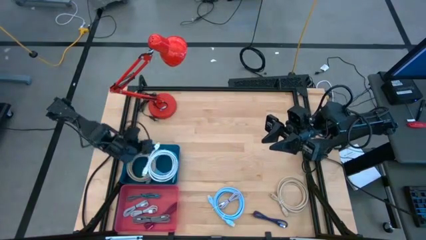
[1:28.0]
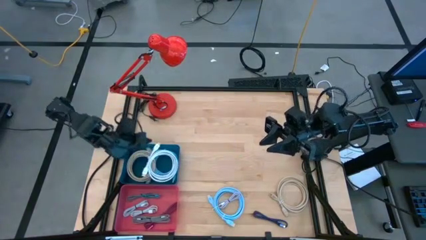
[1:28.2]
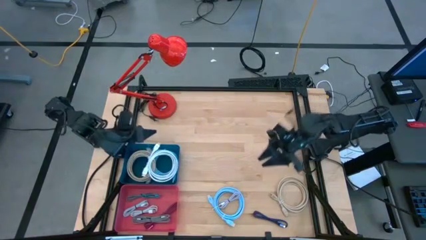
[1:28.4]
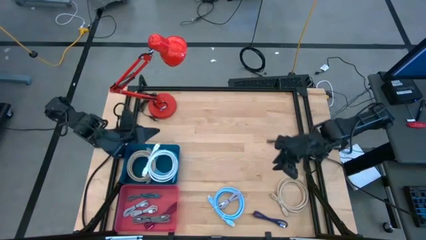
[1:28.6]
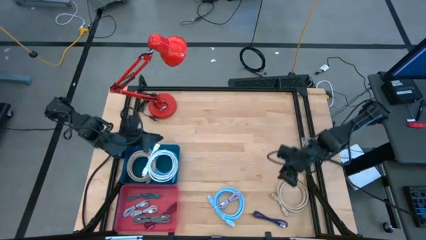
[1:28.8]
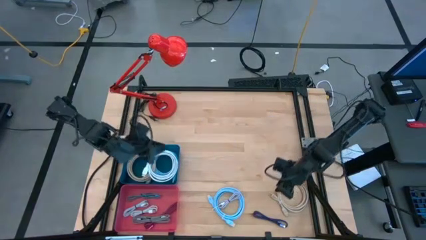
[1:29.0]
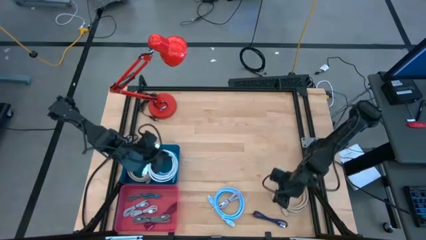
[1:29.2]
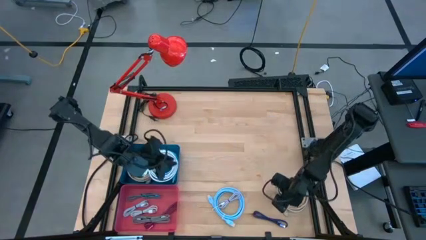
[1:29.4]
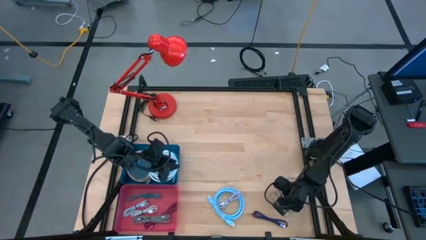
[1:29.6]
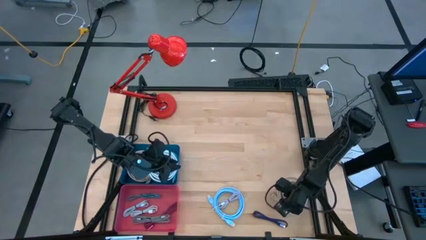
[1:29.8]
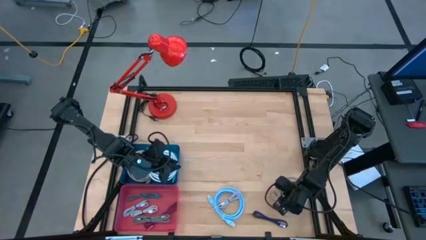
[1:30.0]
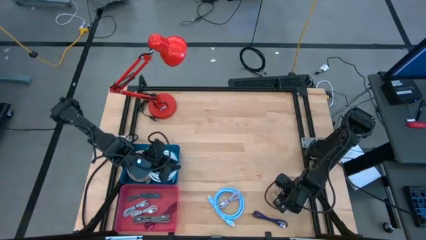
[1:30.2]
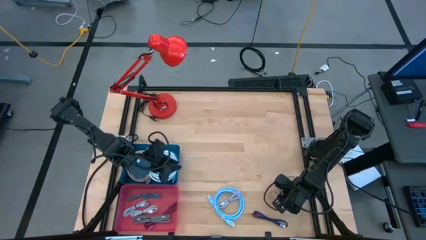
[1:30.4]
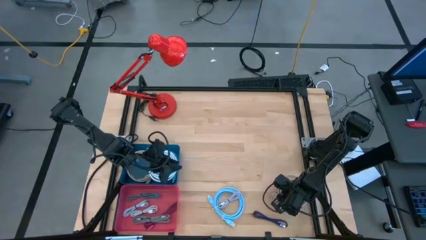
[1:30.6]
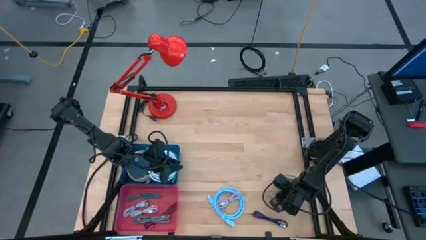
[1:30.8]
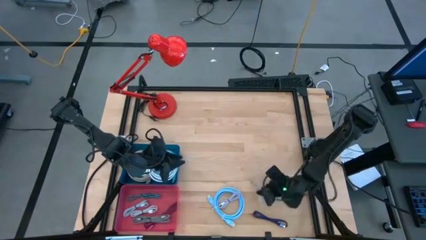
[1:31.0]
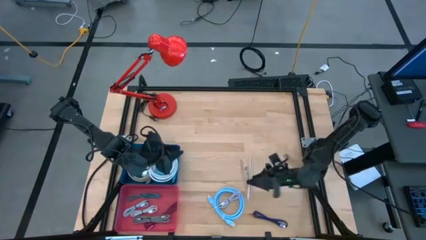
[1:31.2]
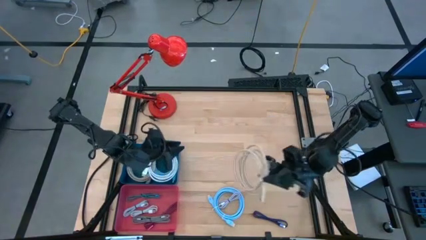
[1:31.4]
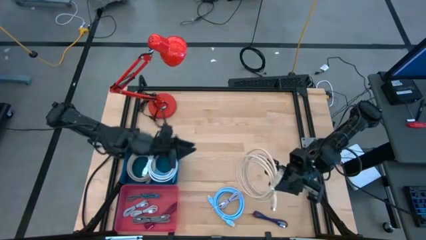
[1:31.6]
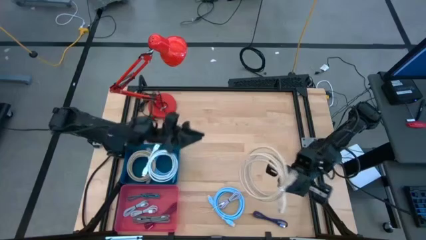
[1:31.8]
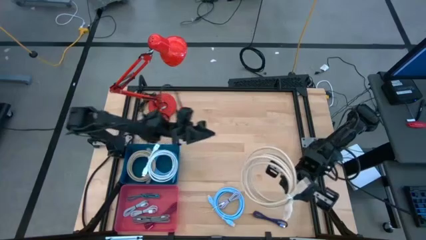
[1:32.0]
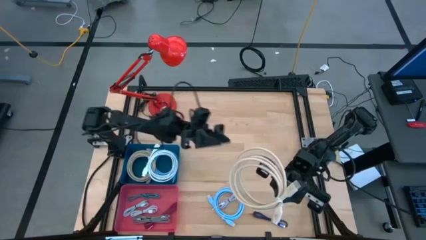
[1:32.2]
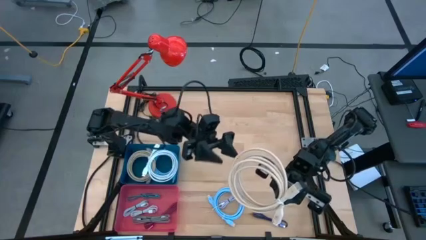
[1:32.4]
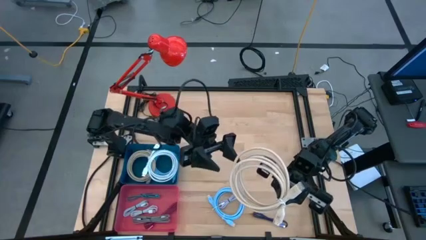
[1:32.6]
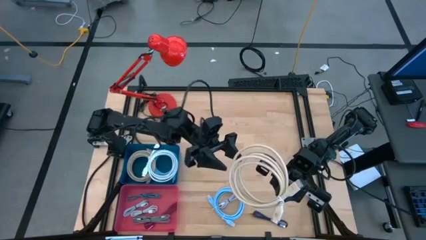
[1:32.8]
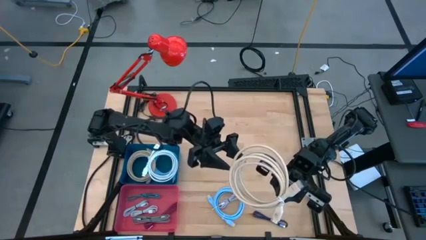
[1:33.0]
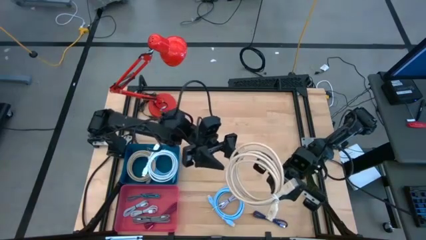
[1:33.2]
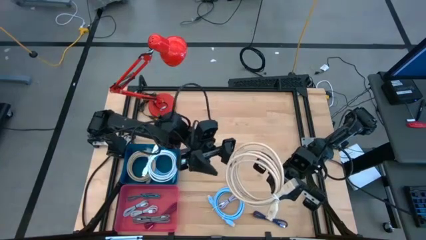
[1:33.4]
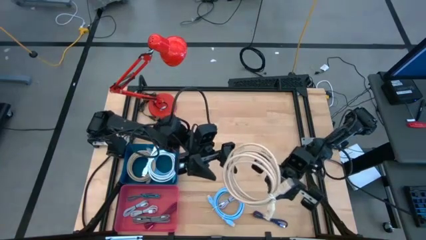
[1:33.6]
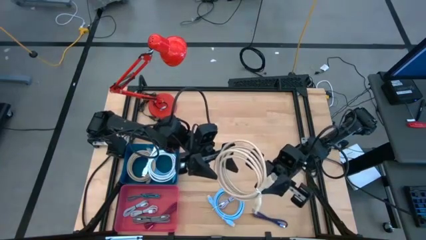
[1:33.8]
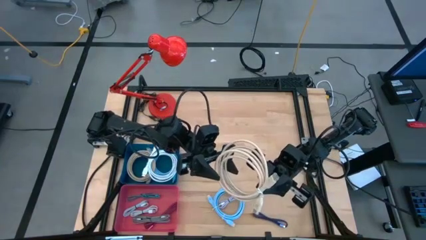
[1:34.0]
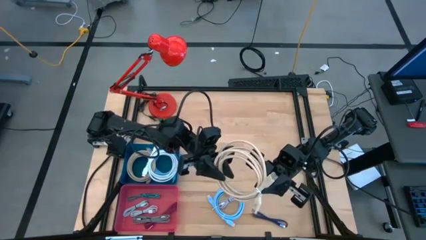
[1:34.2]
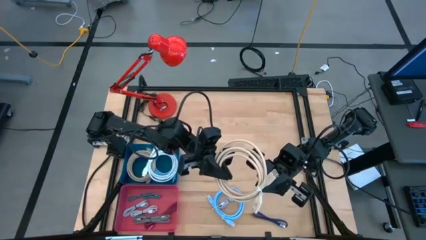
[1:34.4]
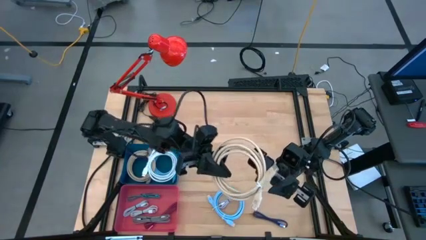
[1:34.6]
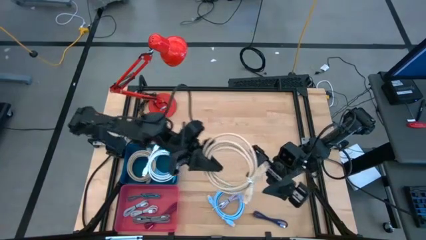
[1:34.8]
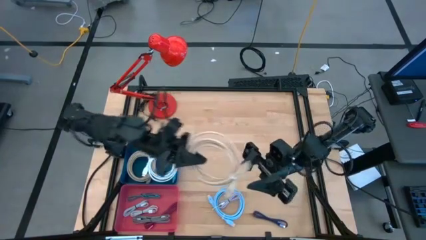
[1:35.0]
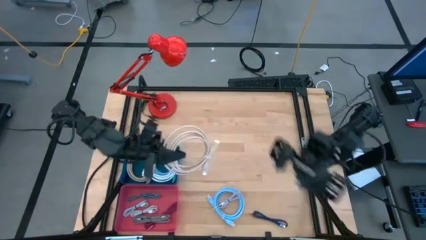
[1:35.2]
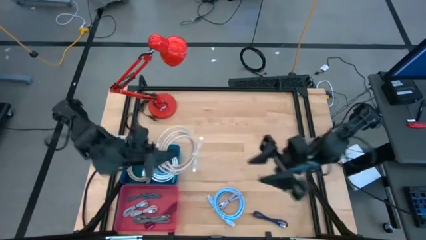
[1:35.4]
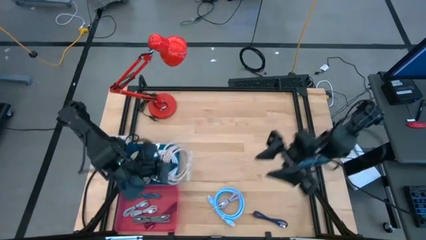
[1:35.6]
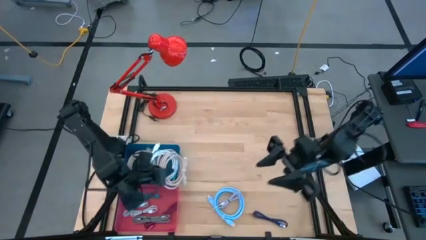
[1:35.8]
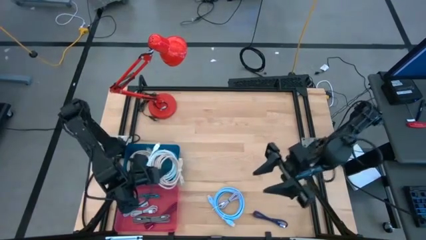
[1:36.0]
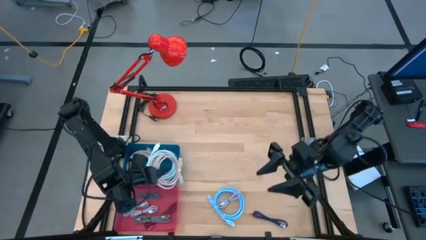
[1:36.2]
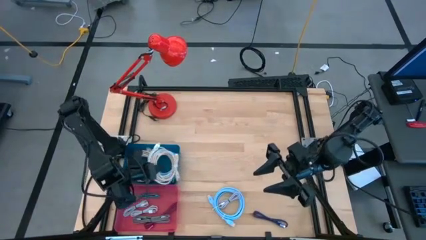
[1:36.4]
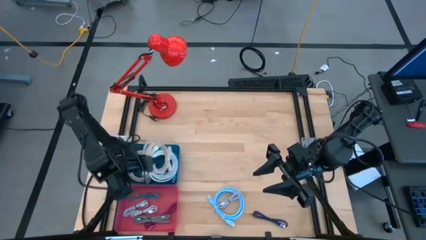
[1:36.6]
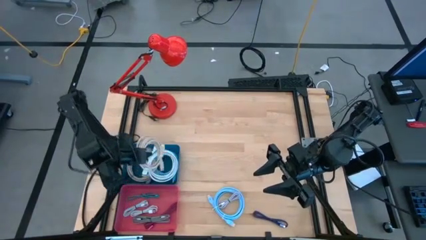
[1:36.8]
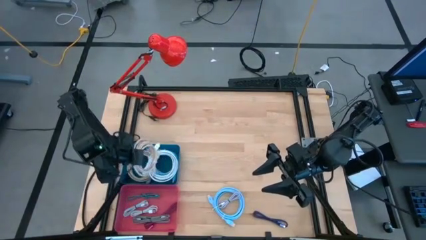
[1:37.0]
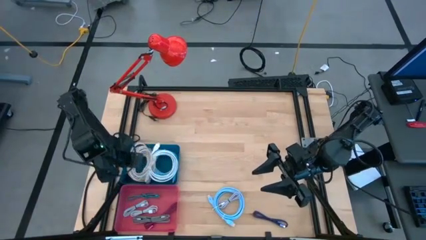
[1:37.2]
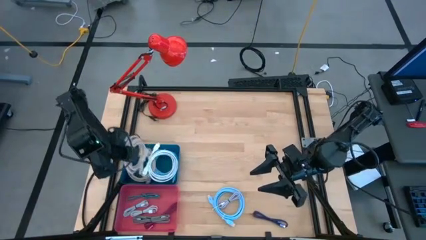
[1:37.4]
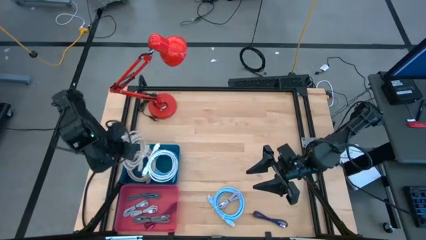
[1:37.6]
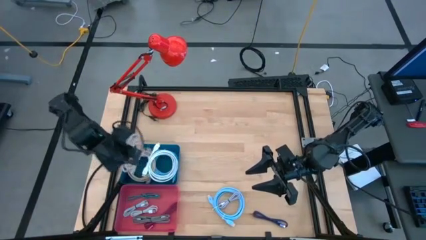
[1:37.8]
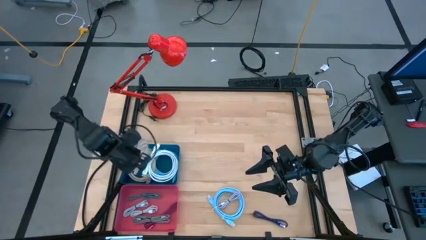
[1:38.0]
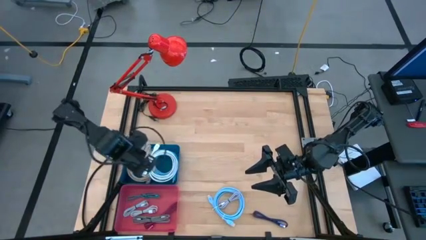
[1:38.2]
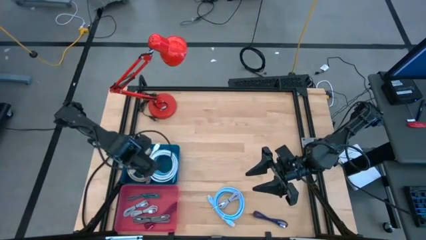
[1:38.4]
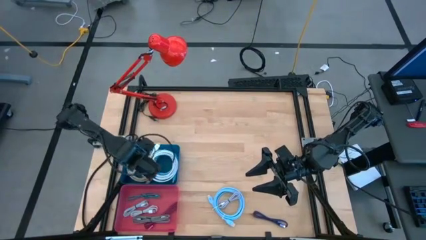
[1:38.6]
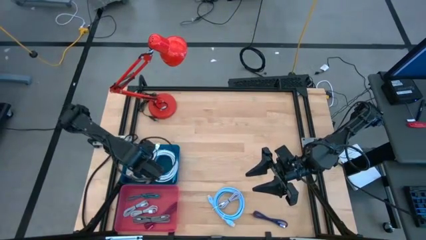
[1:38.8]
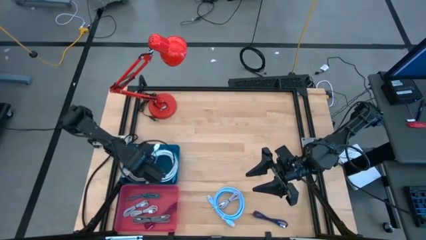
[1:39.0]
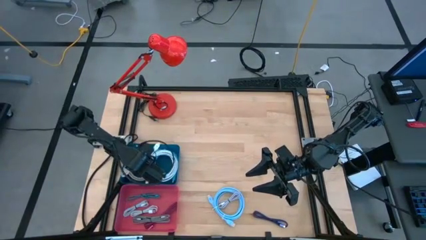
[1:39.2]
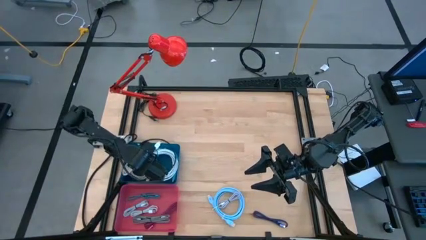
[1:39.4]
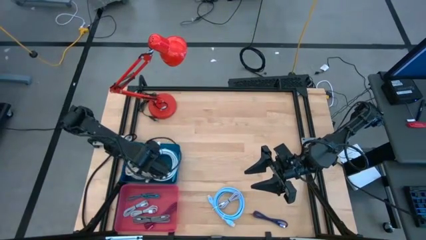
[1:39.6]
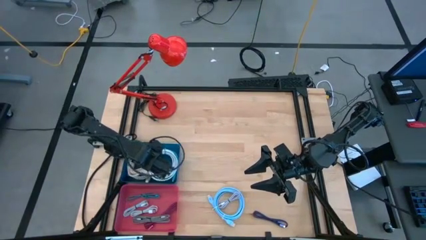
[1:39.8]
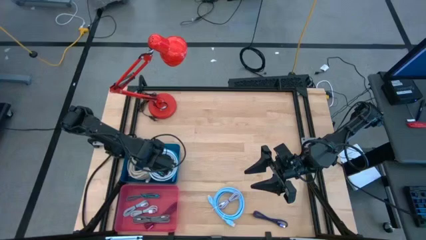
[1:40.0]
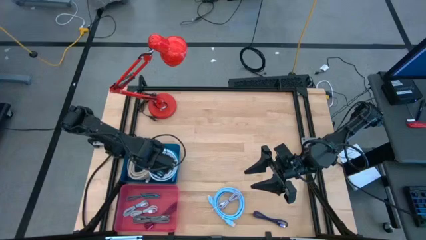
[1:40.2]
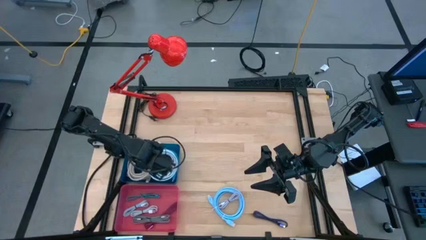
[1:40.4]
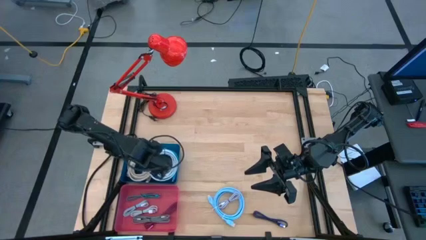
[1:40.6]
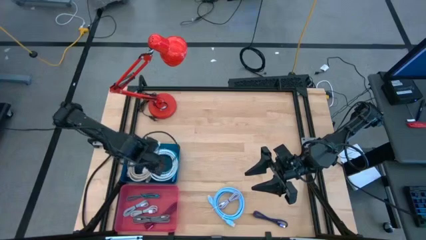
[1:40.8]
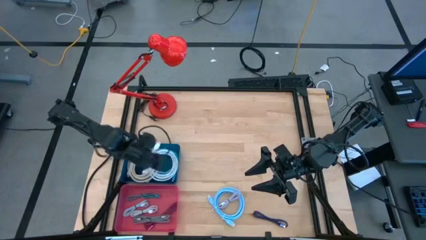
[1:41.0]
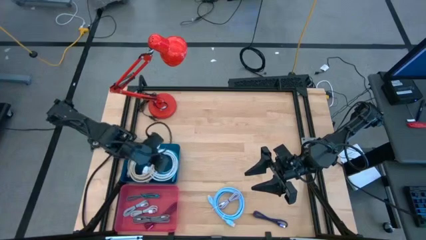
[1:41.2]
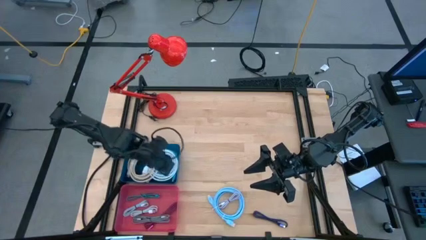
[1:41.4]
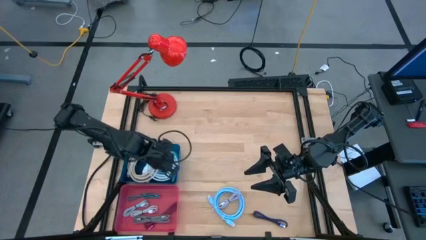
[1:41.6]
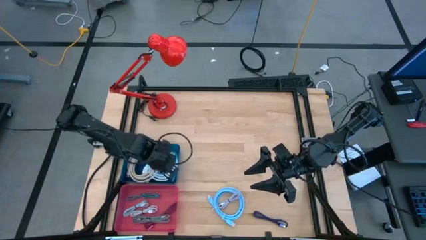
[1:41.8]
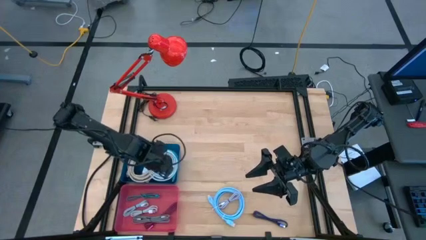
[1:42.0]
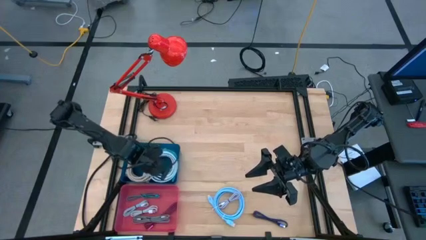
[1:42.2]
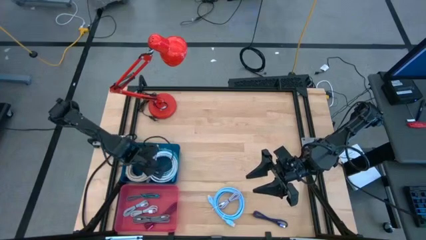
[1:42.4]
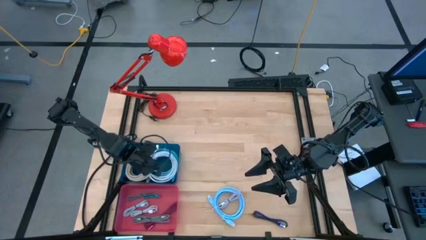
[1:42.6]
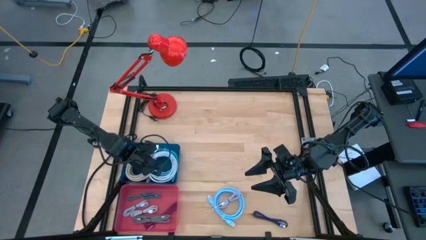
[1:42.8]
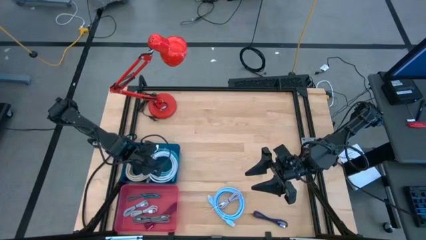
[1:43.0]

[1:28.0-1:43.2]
Task: Pick & Place USB Port
Put the brown HDMI cable into the blue bin
